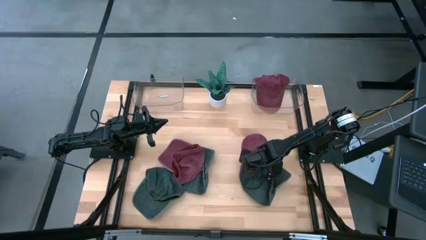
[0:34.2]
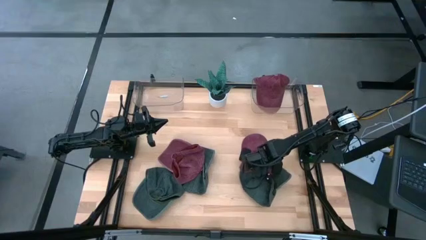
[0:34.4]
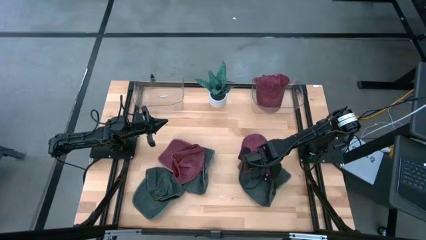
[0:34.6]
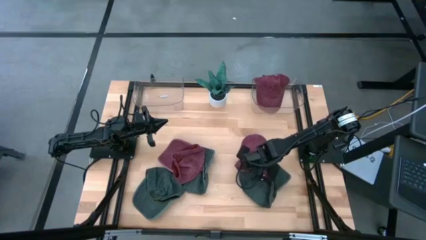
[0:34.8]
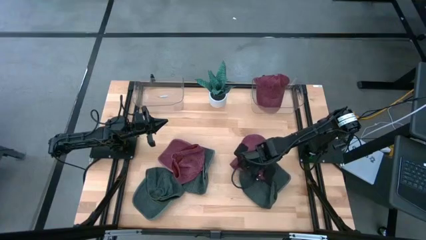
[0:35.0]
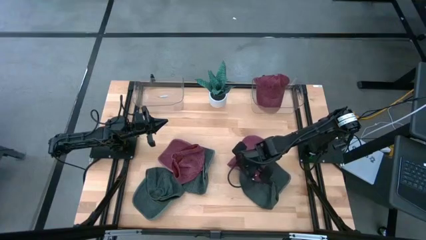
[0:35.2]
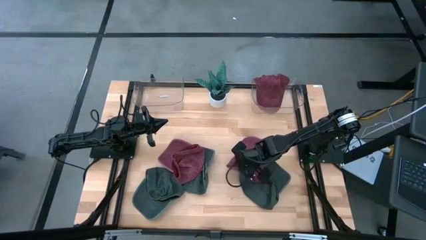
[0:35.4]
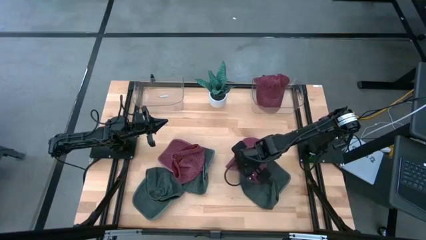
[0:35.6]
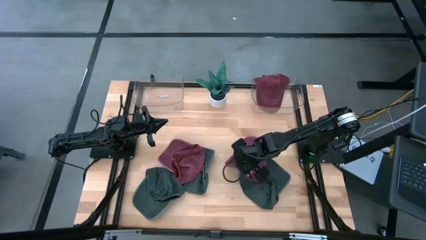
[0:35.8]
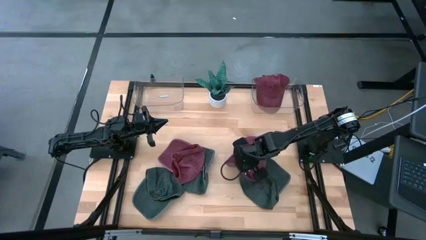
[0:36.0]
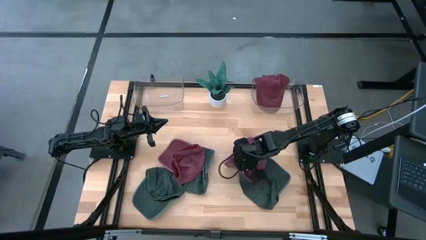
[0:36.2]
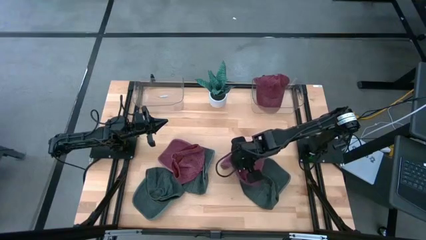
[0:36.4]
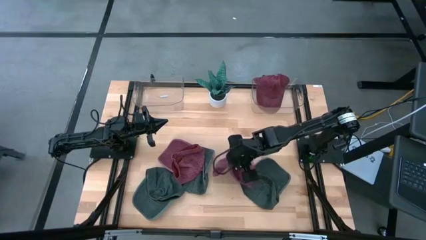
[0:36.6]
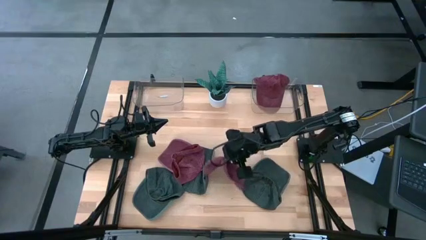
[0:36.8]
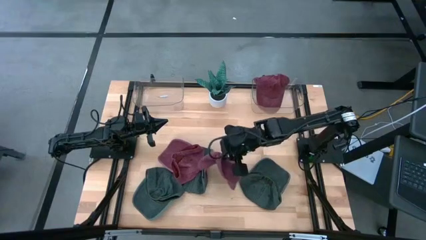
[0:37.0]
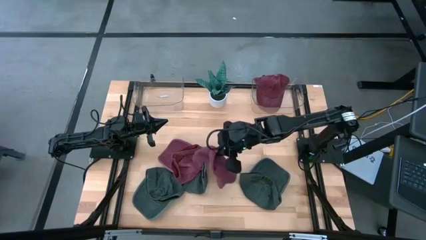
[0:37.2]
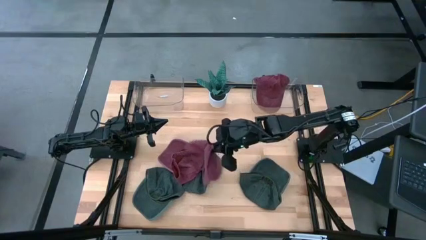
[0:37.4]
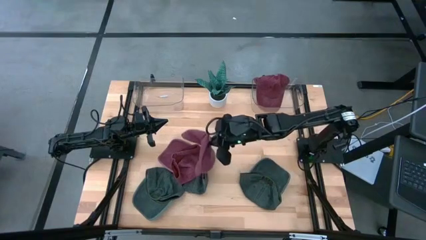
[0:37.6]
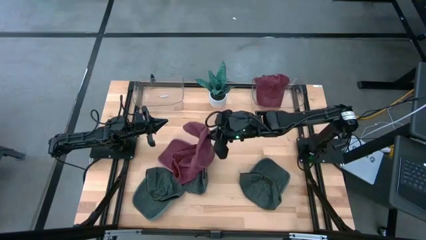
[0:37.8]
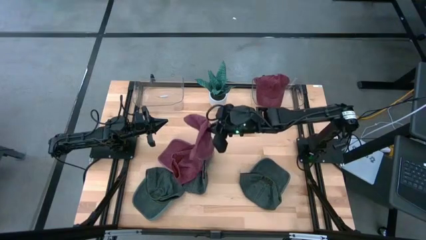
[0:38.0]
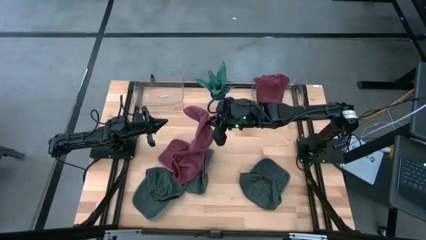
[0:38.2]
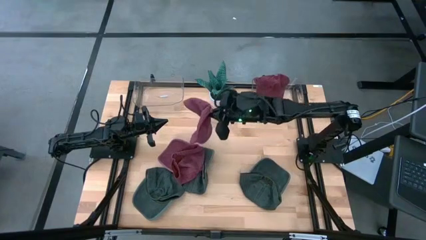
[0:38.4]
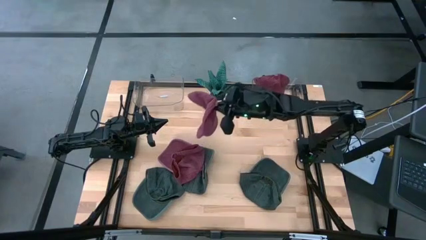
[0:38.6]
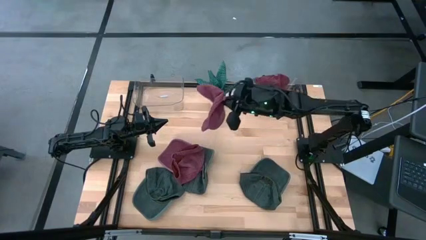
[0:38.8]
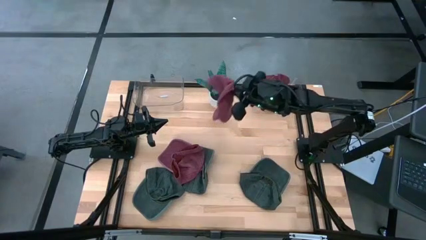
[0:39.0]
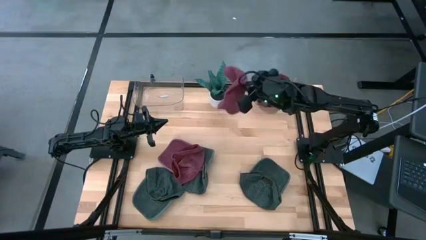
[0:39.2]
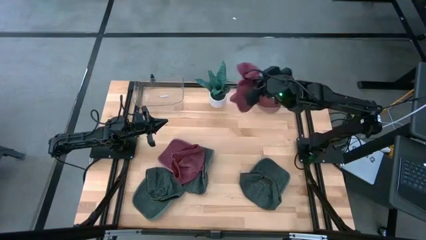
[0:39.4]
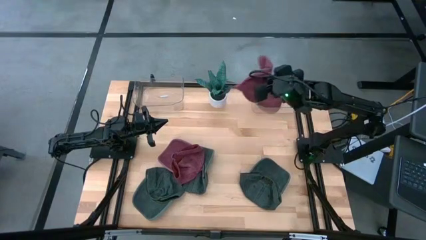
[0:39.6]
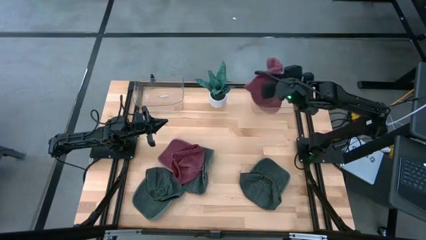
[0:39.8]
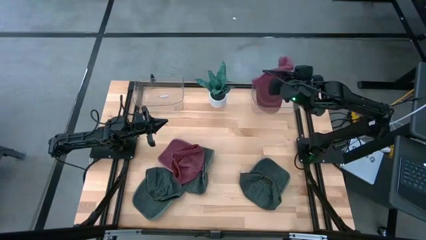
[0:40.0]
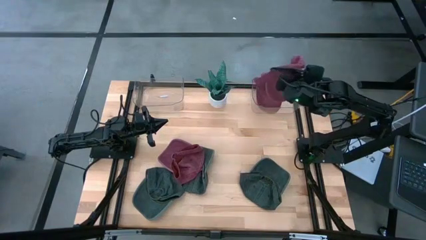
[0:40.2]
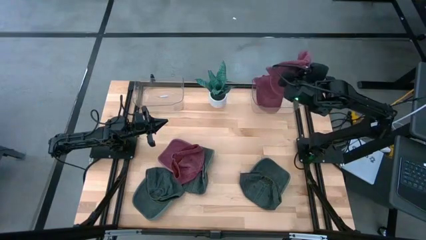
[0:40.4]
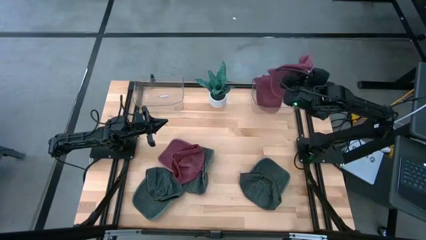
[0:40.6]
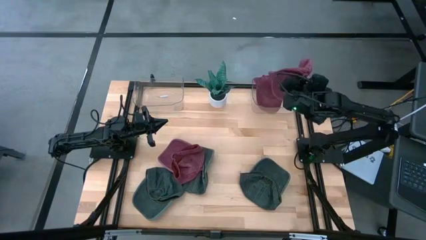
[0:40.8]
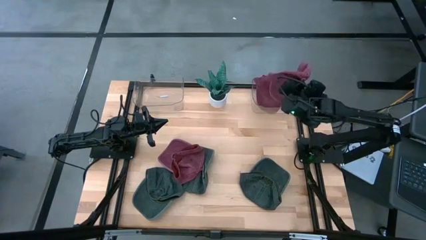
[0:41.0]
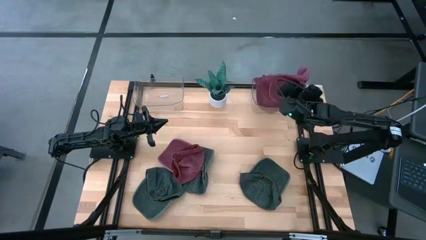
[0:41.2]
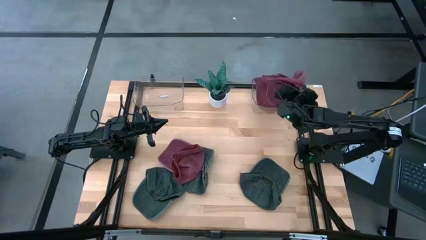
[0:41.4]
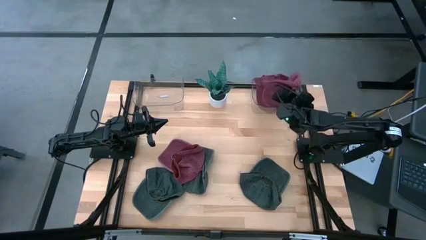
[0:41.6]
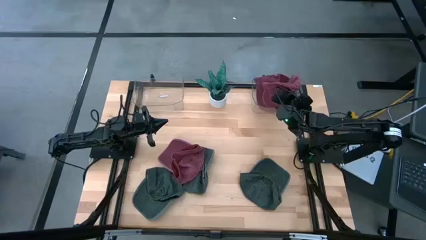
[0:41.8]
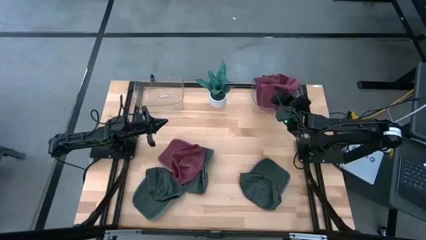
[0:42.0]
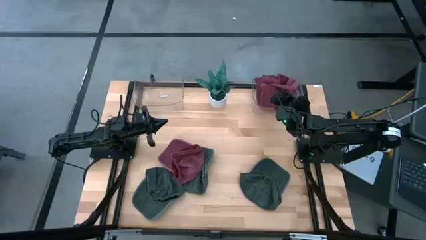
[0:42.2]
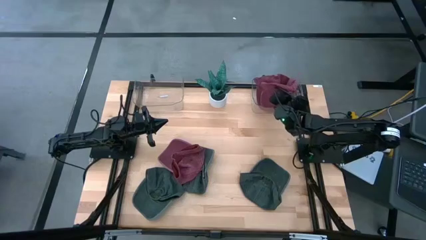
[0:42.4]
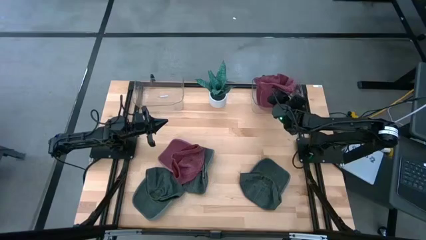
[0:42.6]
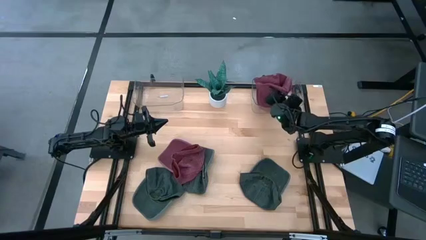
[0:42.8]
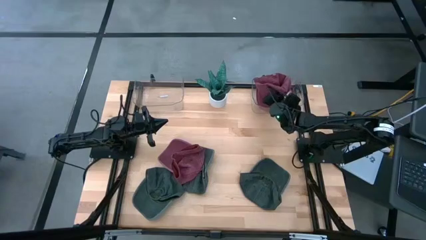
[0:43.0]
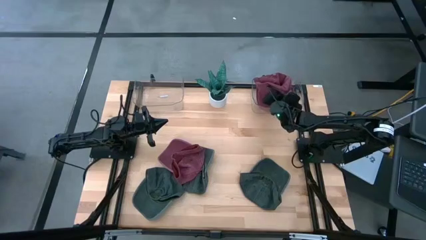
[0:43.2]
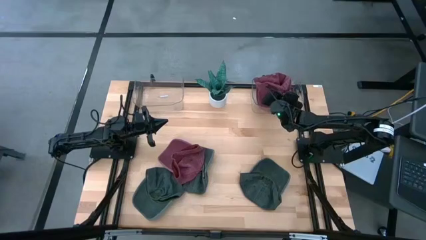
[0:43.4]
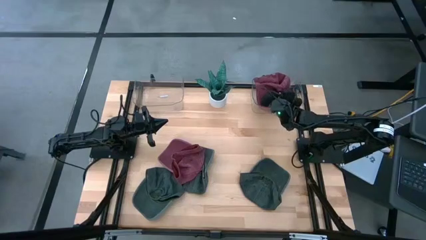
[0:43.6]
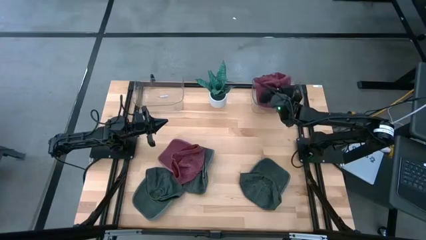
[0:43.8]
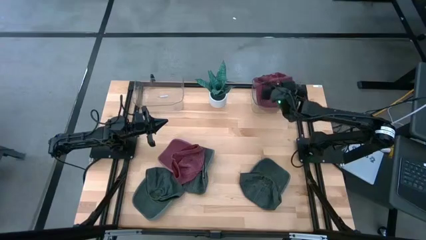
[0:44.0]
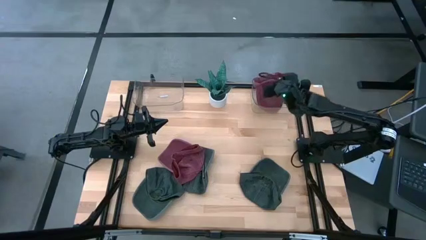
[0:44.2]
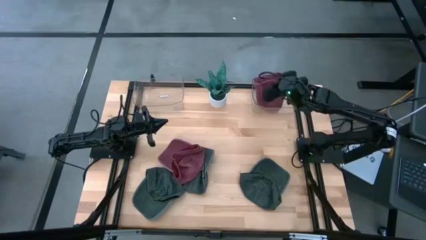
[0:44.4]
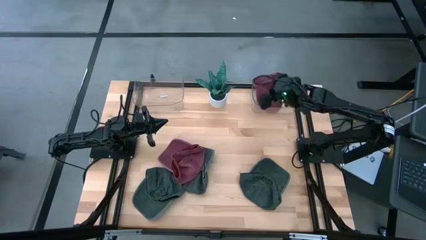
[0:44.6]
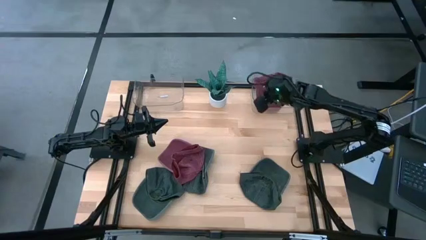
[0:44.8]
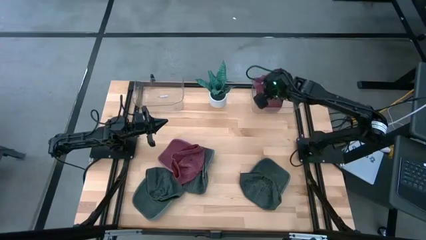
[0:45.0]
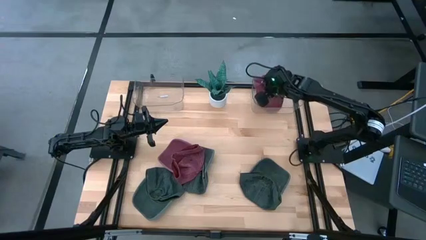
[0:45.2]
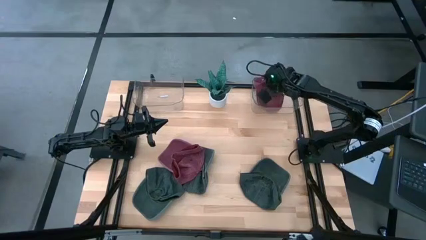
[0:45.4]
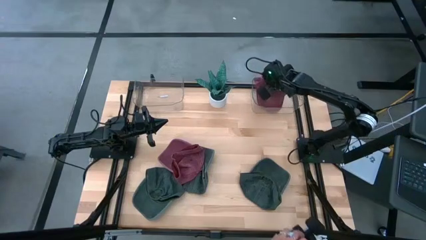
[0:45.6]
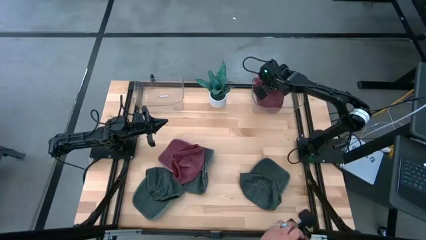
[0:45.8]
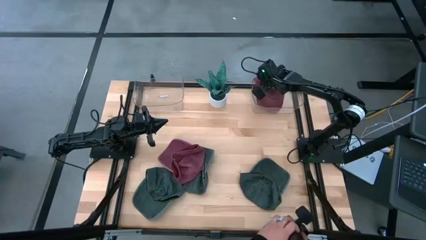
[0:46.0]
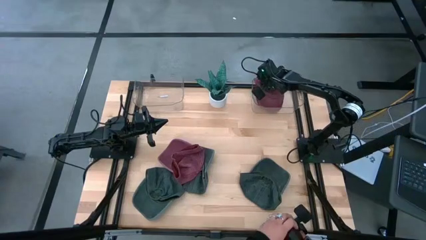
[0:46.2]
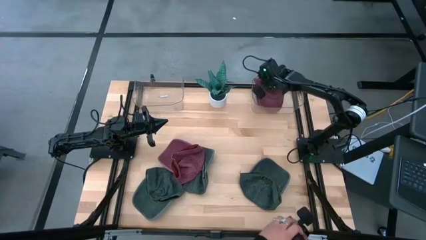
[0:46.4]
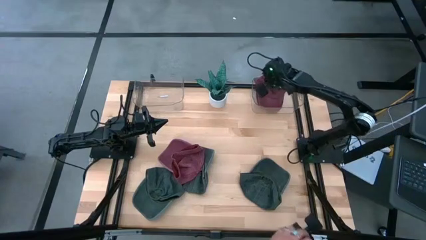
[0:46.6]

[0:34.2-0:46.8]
Task: Pick & Place hat
Put the right red cap into the right transparent bin
